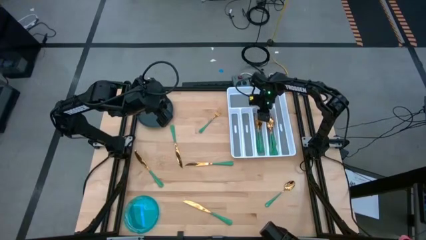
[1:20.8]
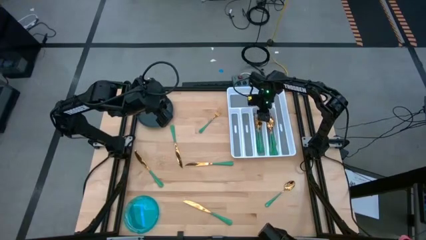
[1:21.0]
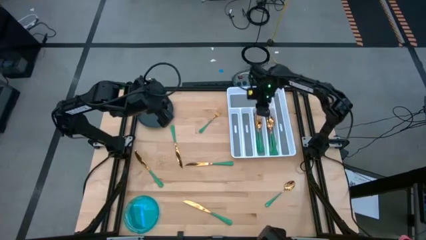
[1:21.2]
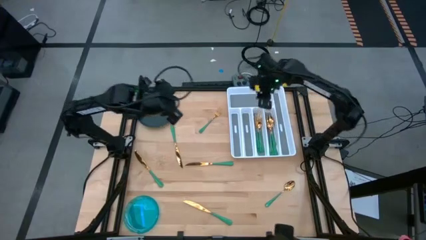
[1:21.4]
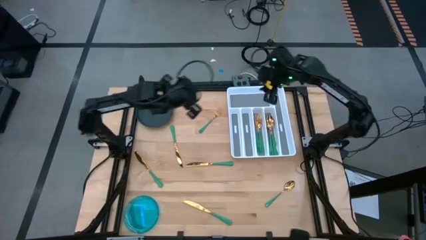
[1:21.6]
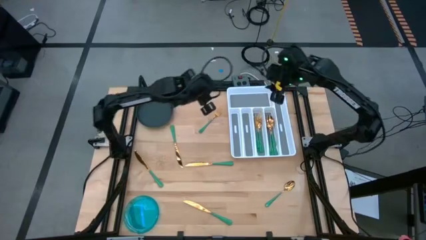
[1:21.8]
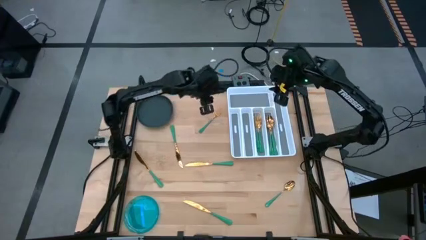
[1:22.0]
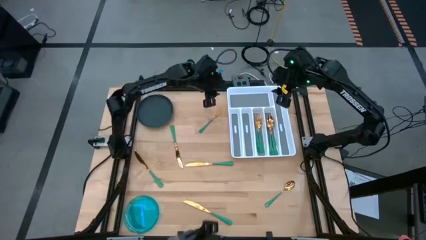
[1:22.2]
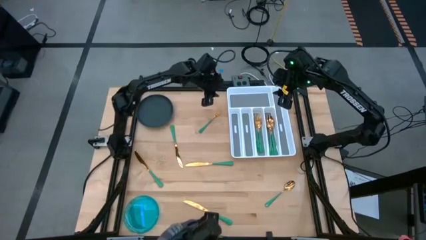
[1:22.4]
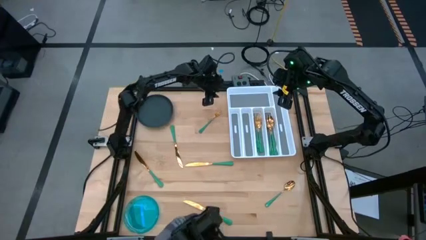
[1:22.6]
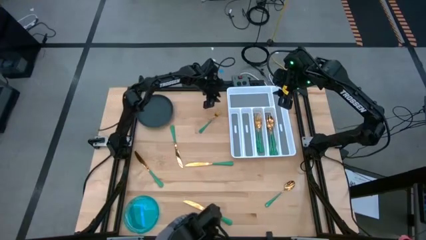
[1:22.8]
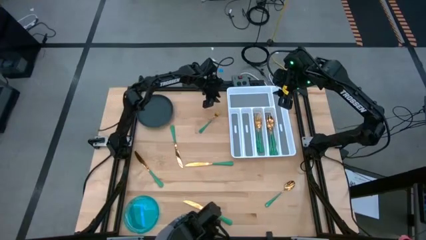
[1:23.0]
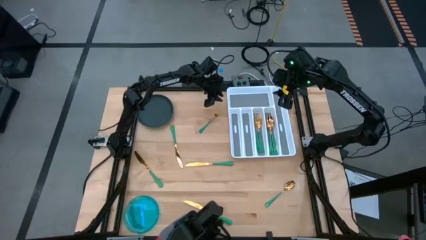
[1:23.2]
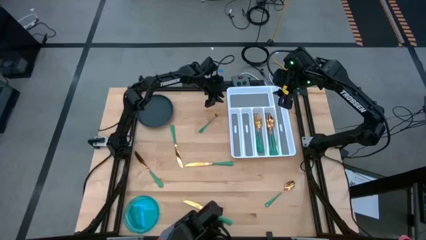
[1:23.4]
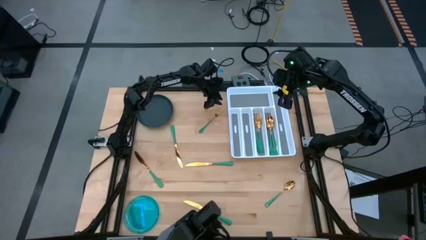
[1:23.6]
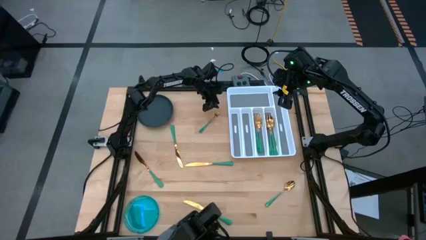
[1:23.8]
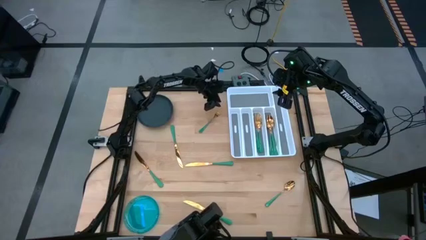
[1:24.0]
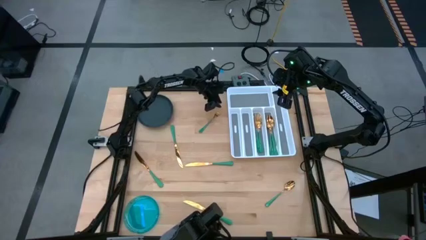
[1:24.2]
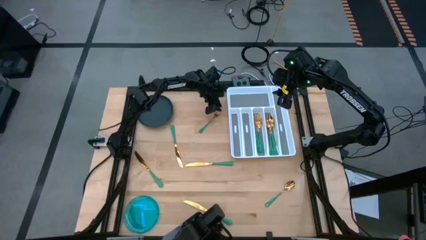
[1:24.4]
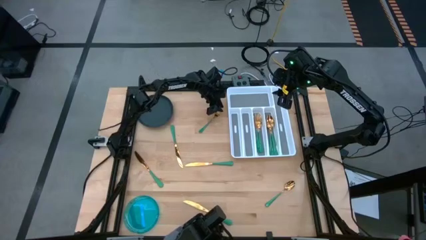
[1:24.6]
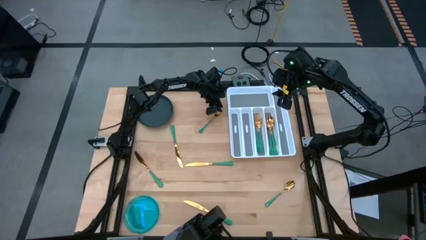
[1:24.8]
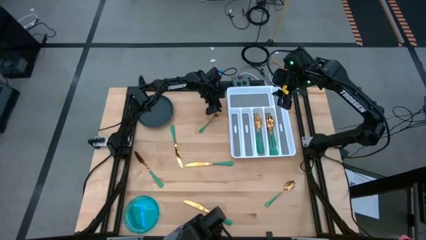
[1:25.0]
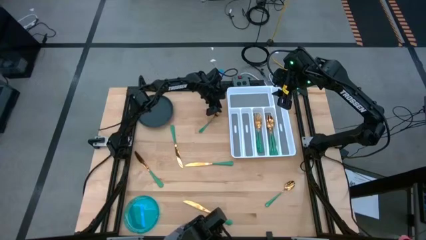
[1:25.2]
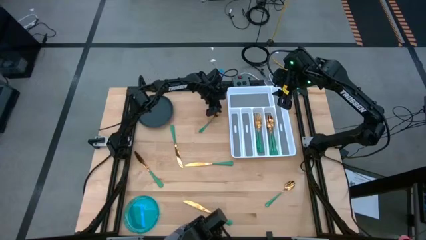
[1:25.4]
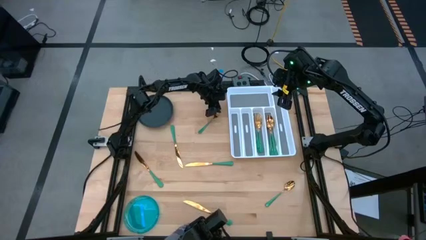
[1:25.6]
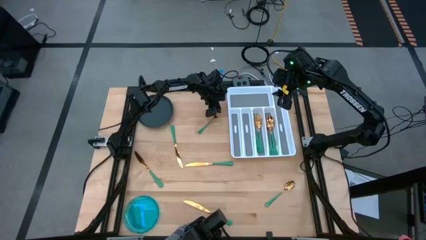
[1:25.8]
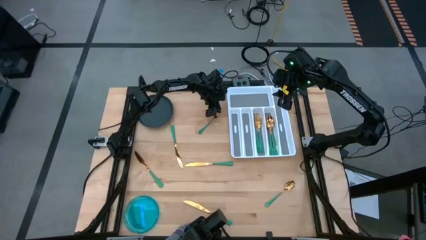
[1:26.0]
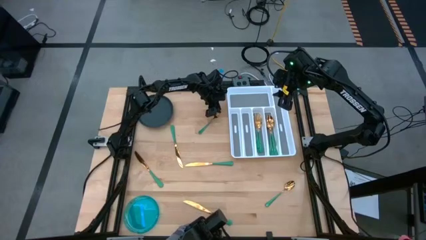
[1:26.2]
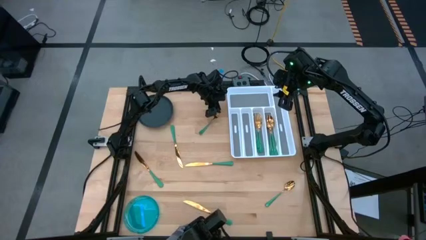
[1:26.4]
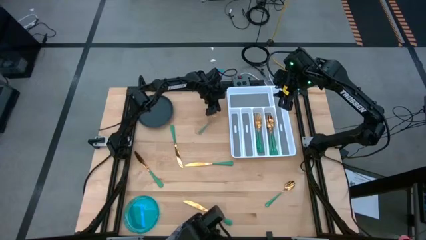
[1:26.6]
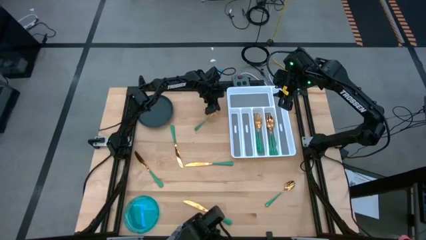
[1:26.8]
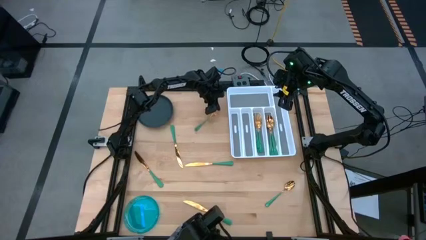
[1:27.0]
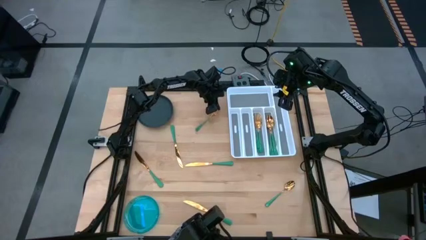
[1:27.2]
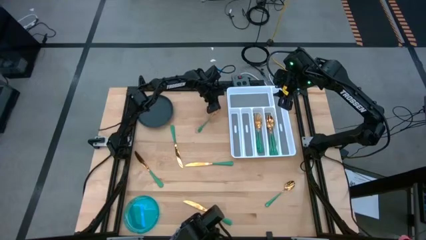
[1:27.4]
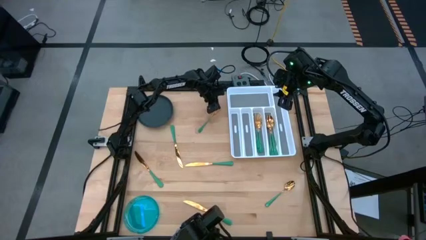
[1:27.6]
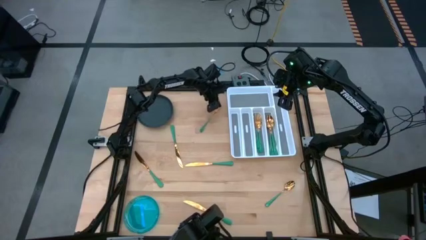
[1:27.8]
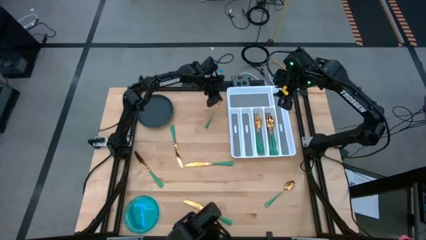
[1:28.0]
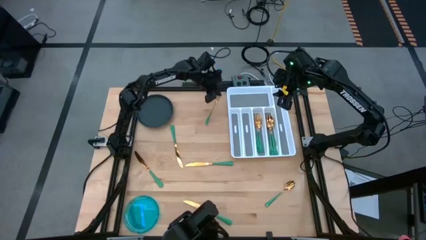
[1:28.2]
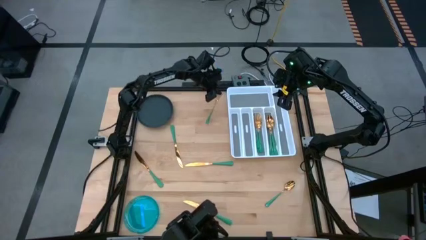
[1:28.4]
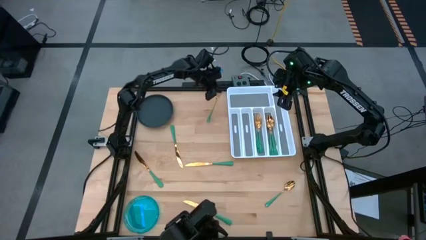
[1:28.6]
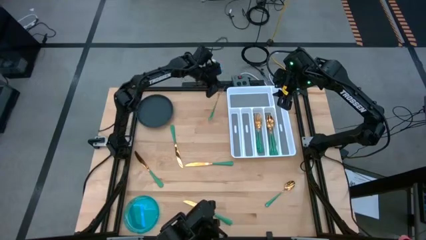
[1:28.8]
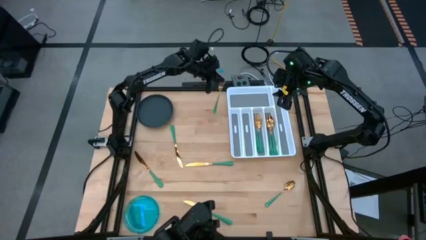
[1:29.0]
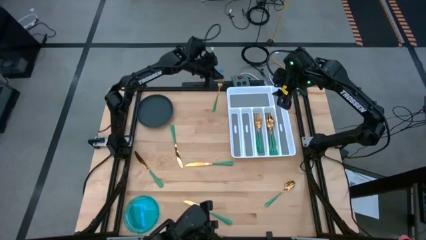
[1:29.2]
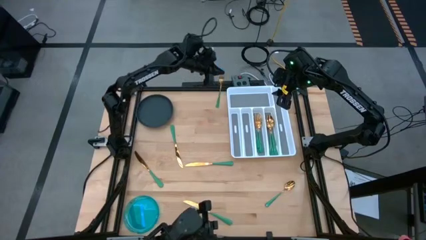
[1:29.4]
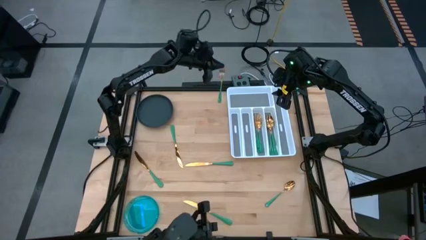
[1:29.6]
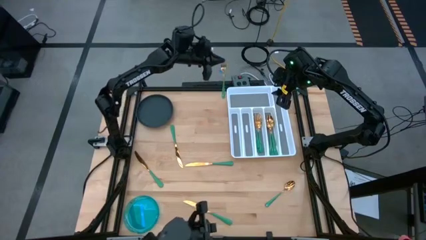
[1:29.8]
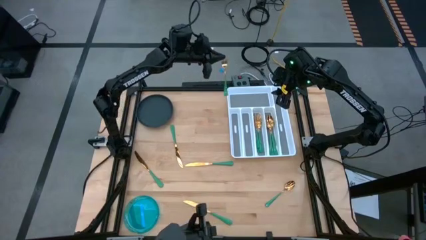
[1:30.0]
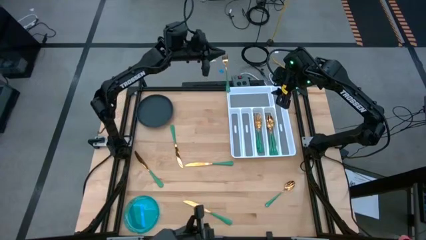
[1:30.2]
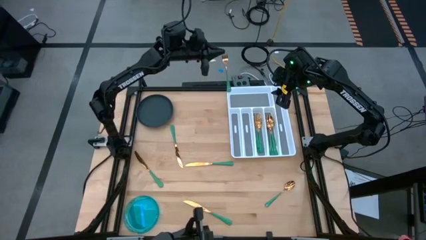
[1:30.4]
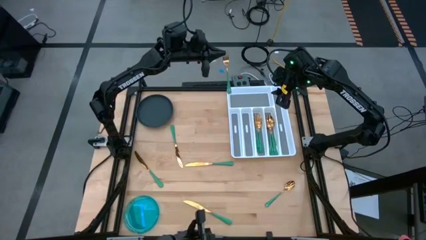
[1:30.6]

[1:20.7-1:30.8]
Task: Sort silverware
Put the green fork into the white silverware organizer

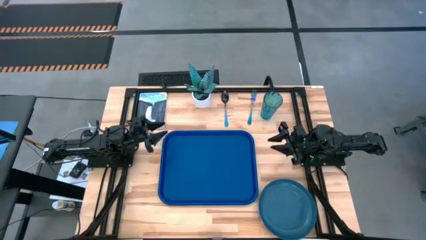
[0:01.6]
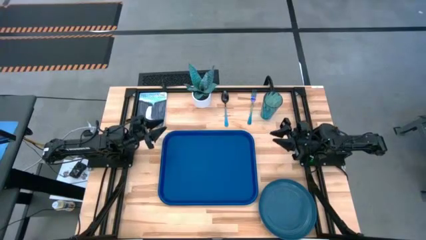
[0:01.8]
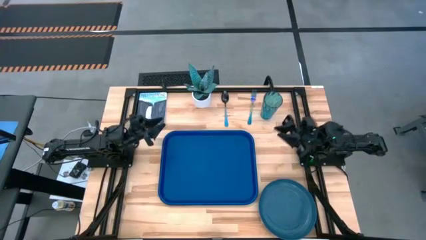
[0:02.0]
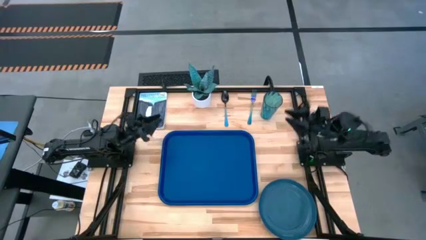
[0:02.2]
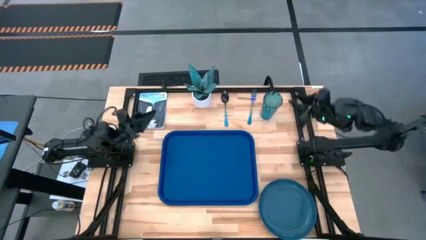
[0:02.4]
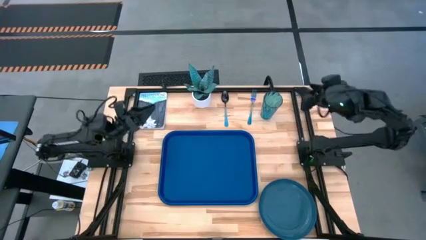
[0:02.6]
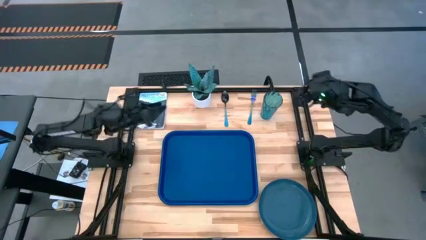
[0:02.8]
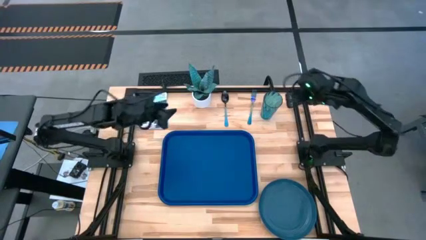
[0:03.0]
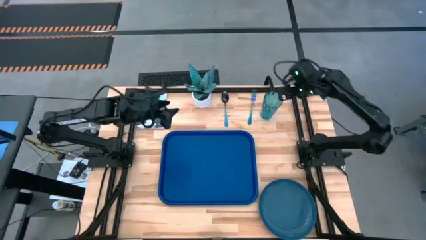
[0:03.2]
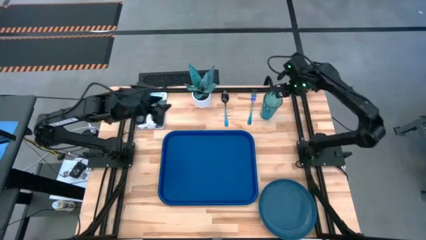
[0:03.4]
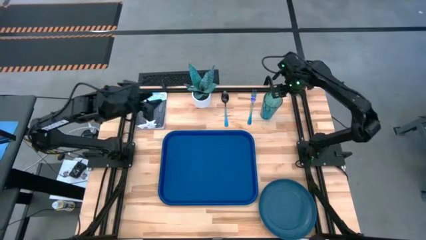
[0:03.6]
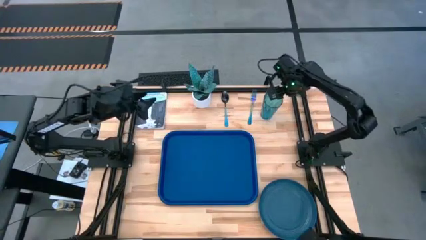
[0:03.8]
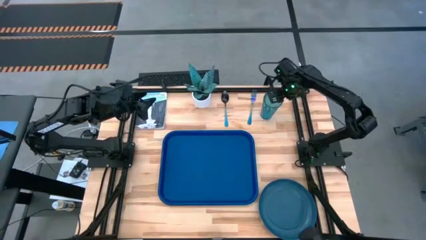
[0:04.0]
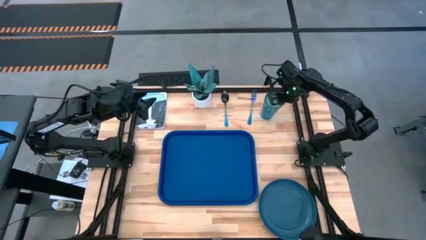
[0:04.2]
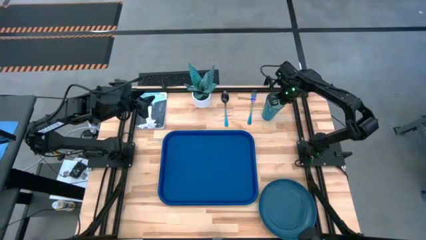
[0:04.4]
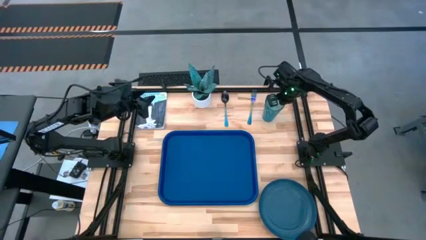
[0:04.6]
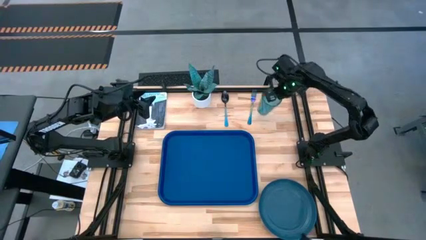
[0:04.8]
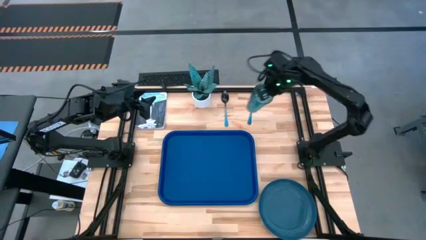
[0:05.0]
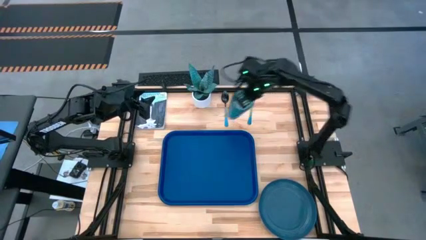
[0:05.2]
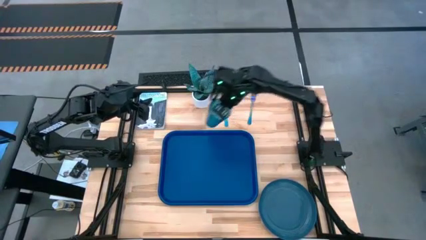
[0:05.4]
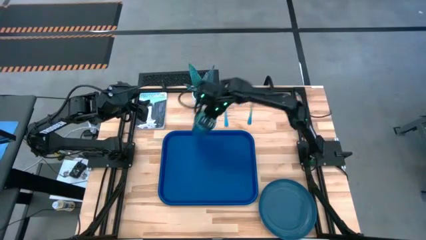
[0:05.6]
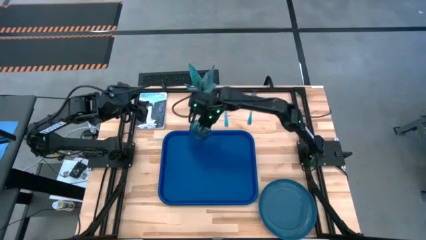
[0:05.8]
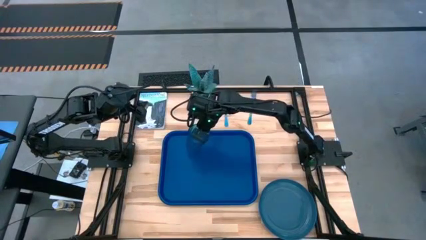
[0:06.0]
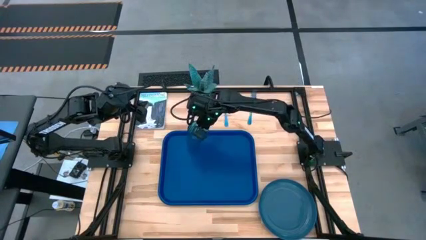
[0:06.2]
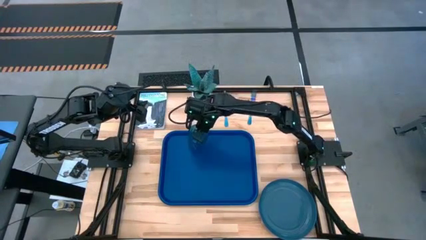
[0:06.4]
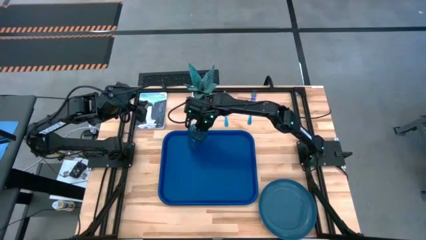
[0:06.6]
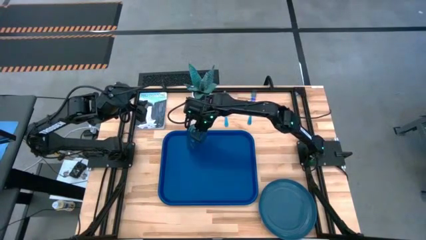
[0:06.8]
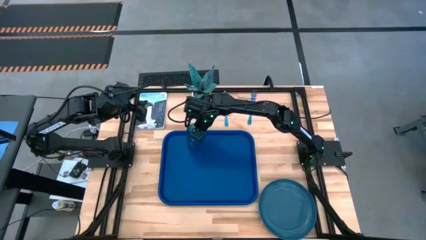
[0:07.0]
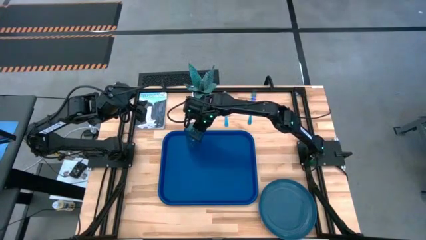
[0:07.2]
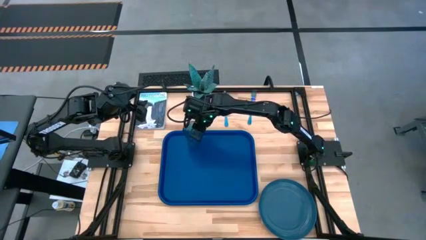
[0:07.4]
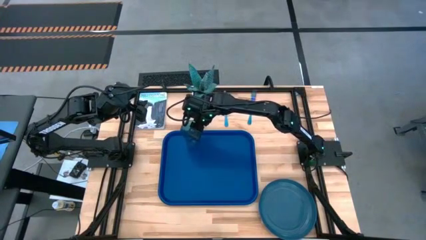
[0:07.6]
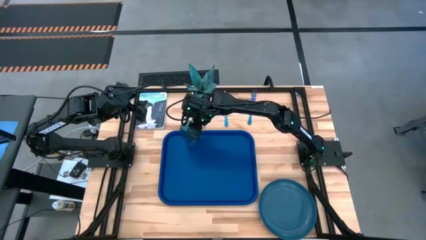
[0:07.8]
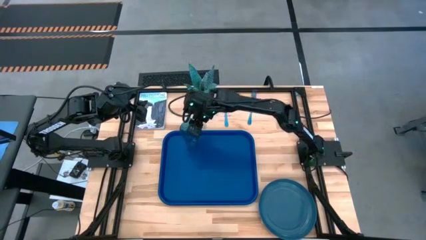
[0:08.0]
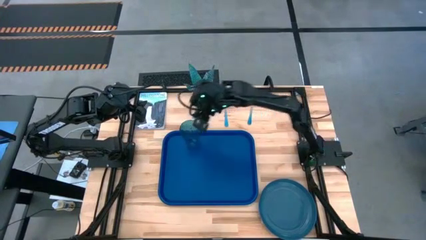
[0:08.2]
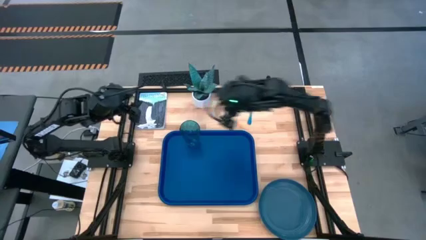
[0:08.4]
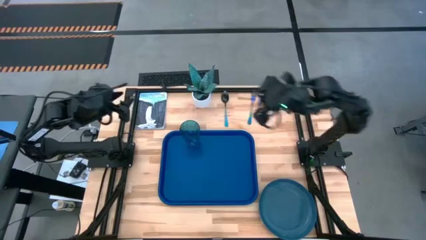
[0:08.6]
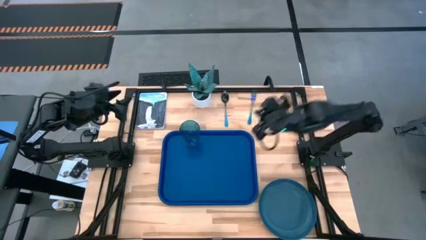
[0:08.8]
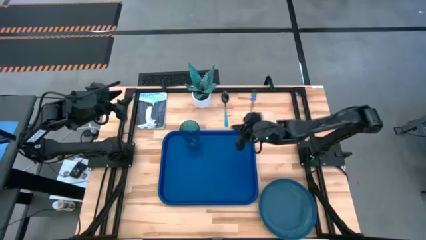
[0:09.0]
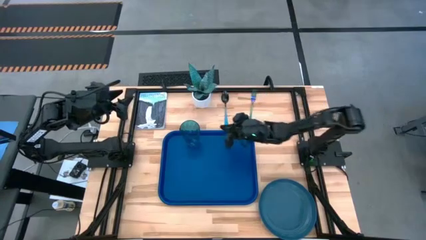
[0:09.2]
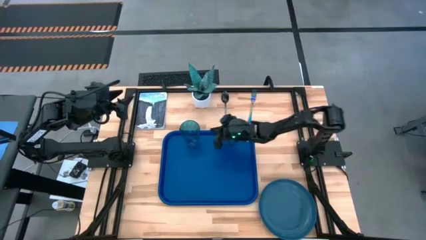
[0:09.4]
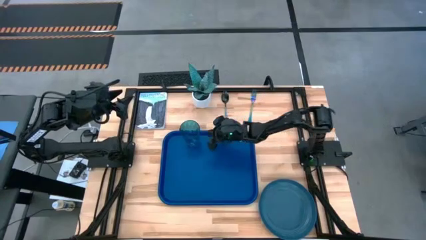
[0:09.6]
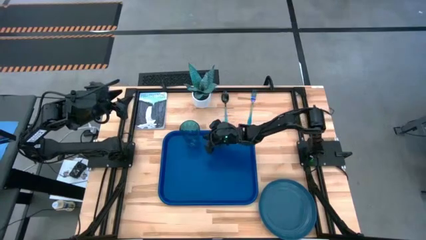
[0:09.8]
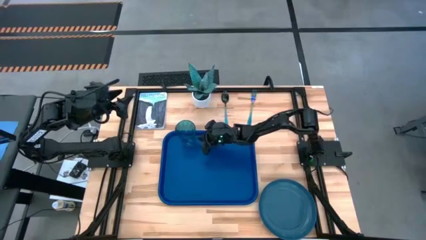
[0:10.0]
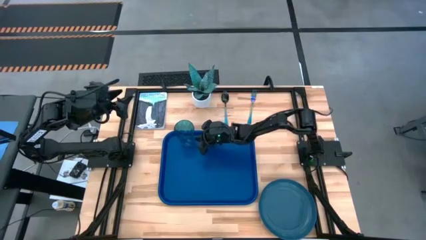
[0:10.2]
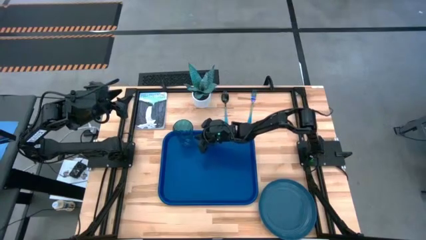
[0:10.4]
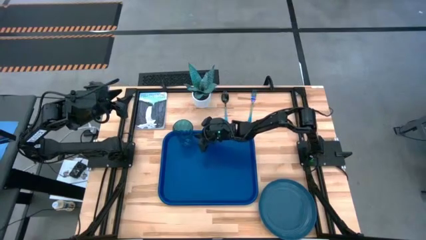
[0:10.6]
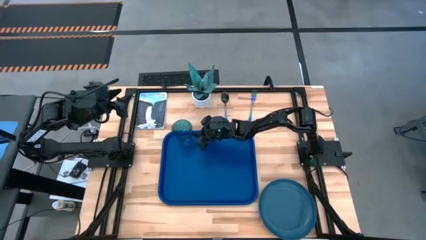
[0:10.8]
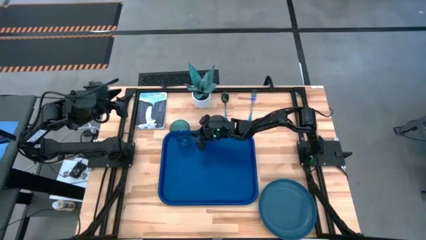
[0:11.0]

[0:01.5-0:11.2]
Task: Pick and place plate/cup/fork/spoon on tray
Put the blue glass on the blue tray
